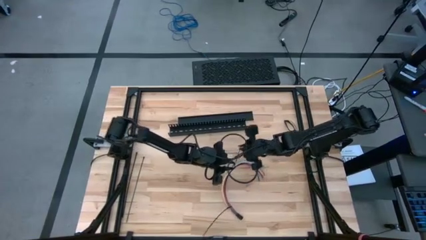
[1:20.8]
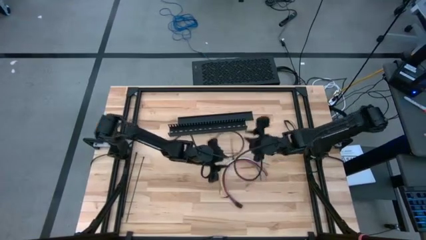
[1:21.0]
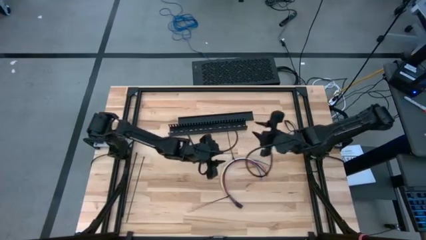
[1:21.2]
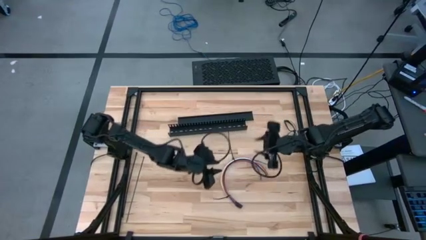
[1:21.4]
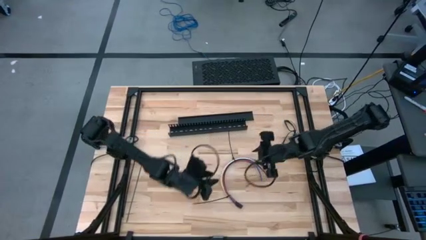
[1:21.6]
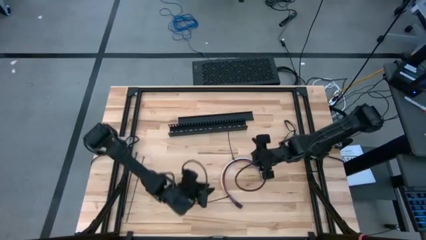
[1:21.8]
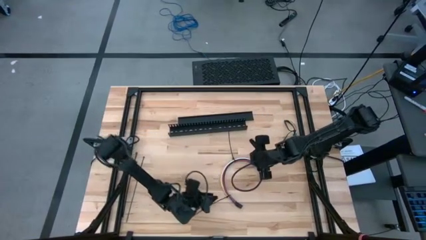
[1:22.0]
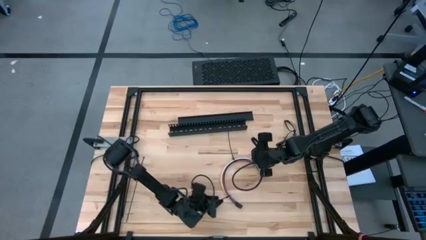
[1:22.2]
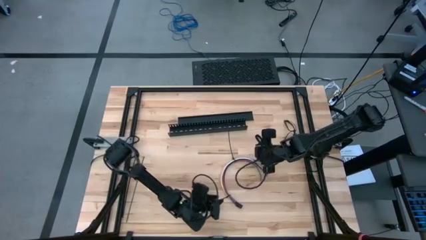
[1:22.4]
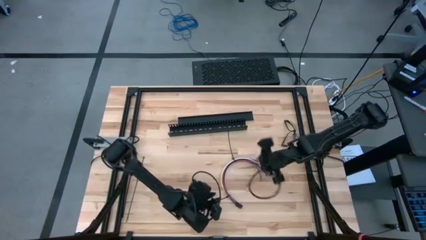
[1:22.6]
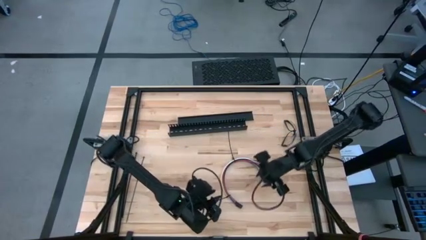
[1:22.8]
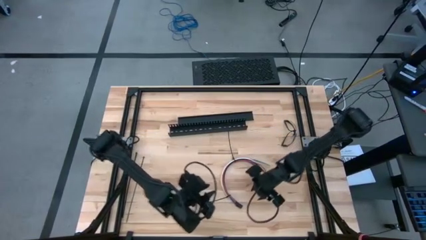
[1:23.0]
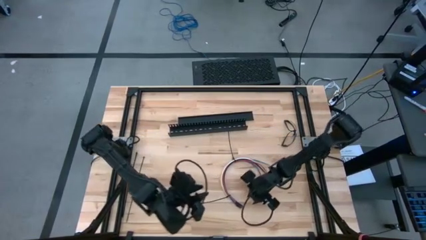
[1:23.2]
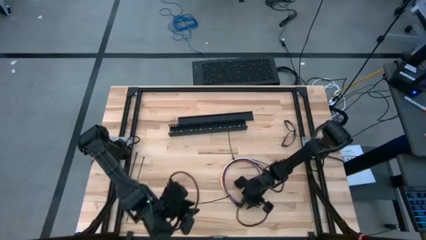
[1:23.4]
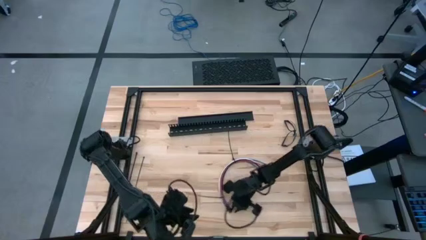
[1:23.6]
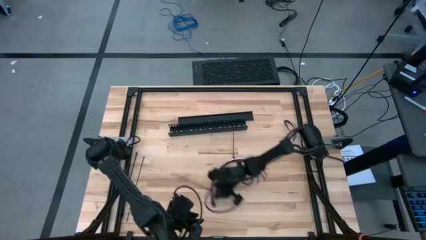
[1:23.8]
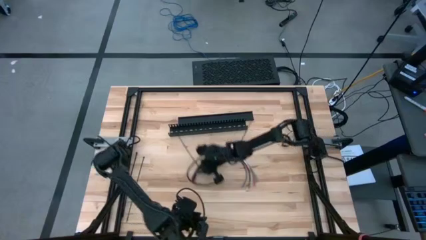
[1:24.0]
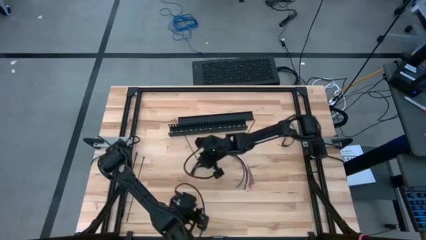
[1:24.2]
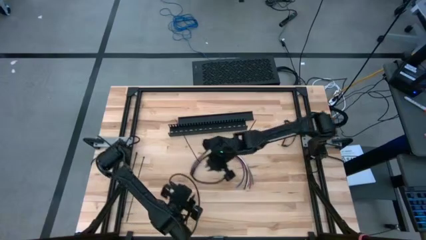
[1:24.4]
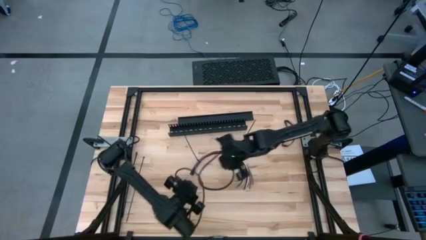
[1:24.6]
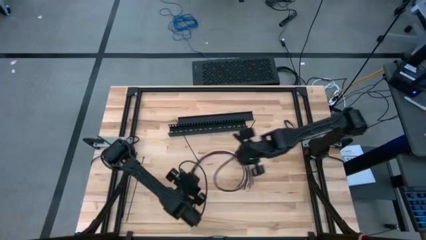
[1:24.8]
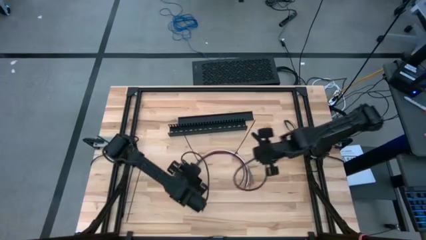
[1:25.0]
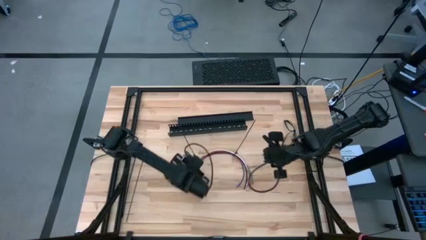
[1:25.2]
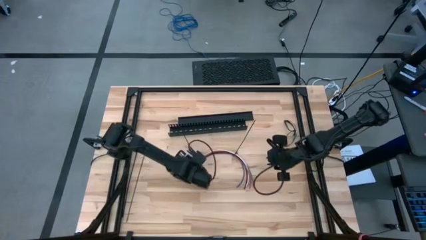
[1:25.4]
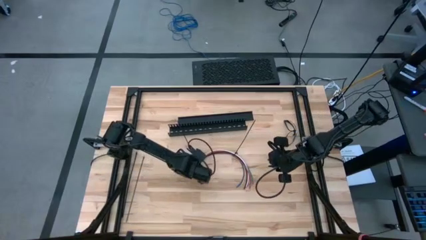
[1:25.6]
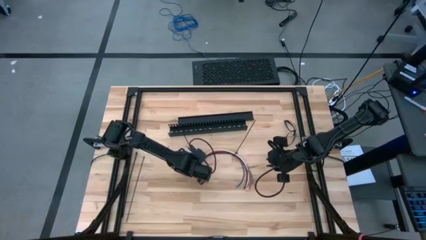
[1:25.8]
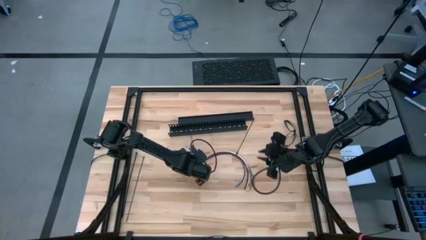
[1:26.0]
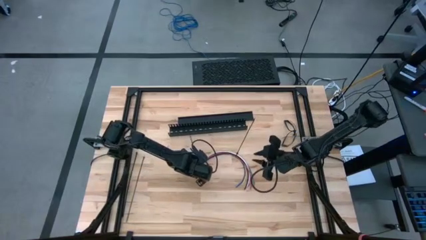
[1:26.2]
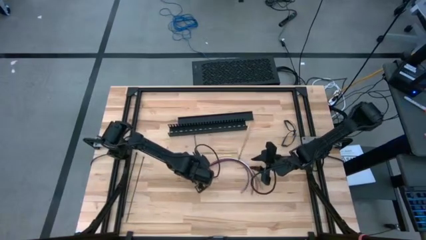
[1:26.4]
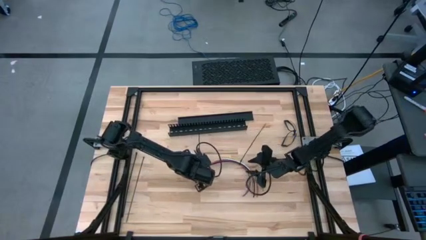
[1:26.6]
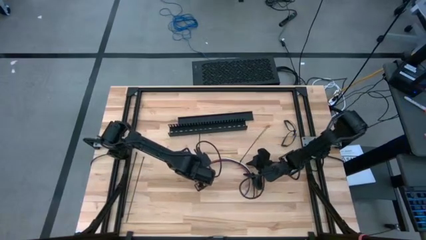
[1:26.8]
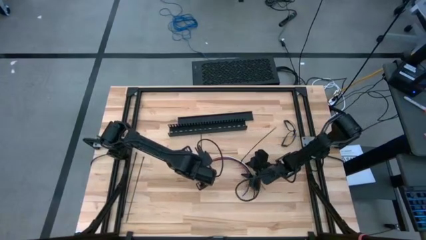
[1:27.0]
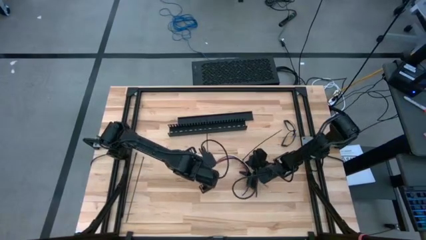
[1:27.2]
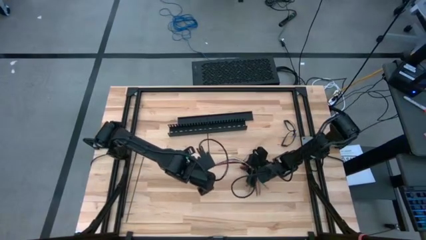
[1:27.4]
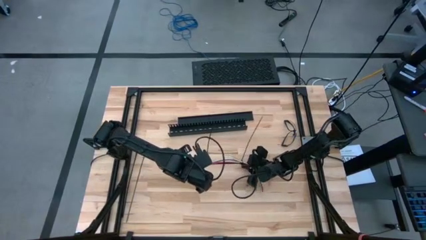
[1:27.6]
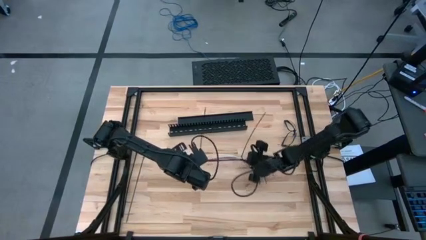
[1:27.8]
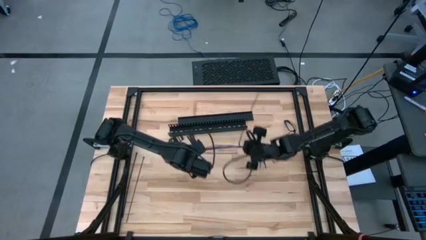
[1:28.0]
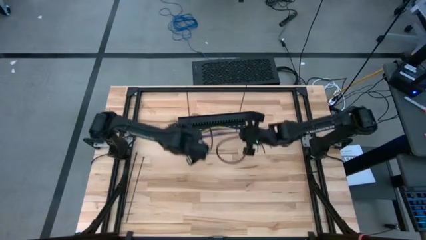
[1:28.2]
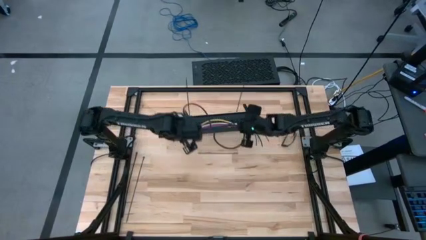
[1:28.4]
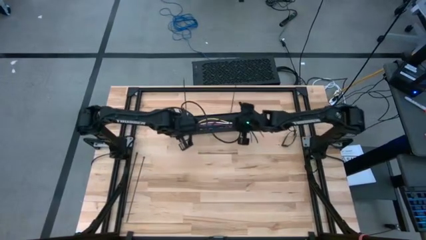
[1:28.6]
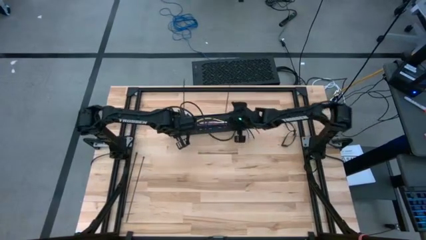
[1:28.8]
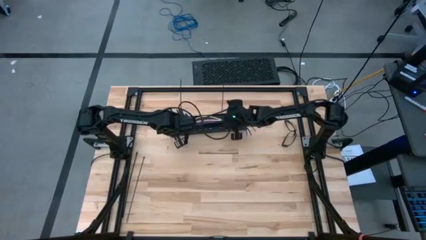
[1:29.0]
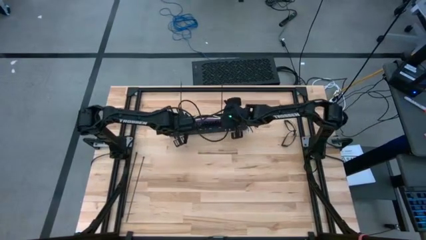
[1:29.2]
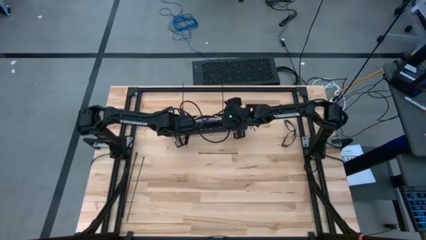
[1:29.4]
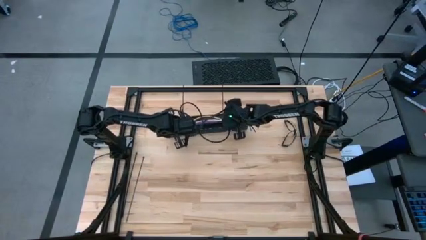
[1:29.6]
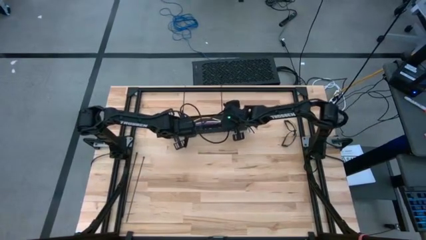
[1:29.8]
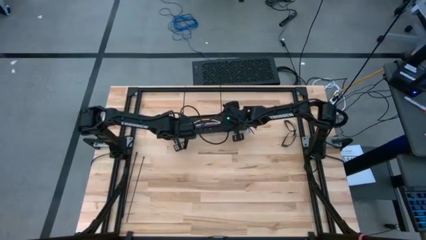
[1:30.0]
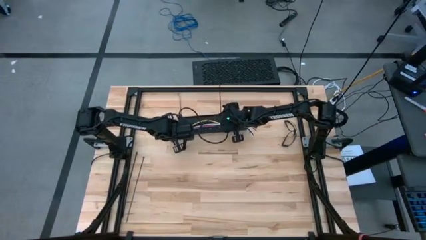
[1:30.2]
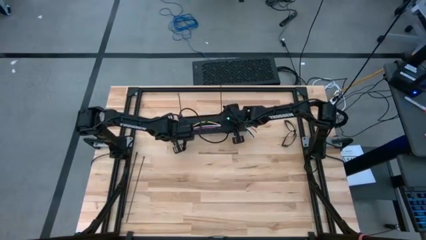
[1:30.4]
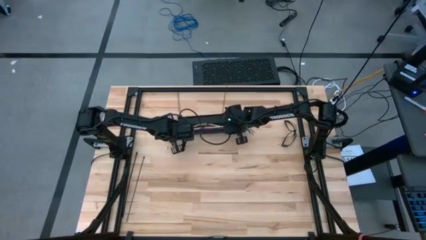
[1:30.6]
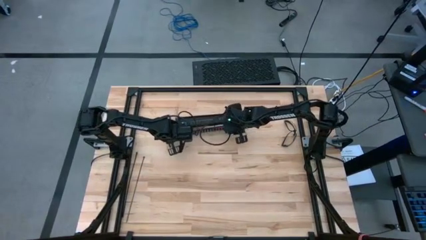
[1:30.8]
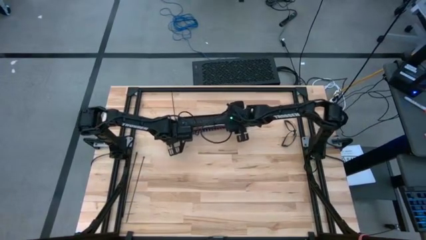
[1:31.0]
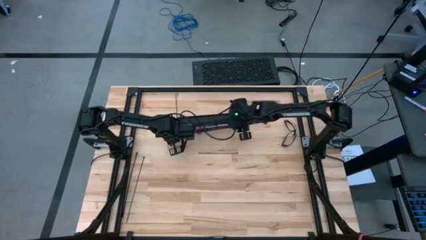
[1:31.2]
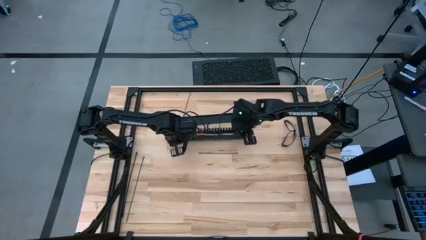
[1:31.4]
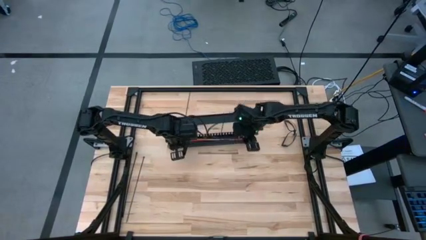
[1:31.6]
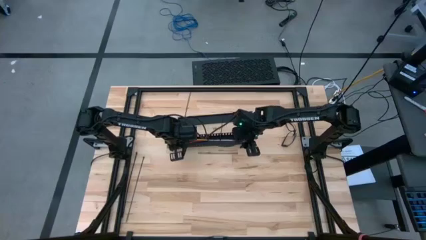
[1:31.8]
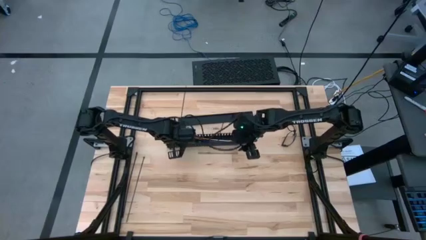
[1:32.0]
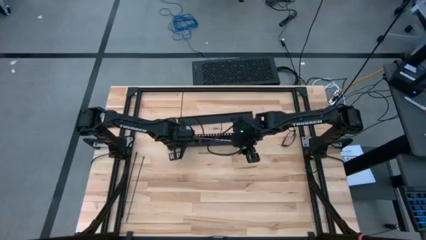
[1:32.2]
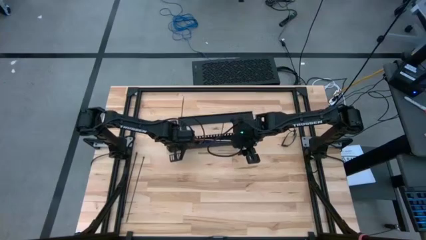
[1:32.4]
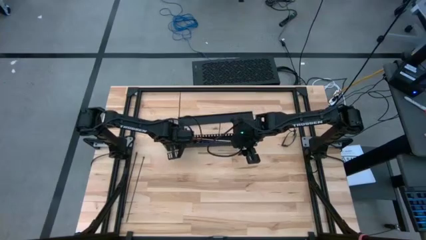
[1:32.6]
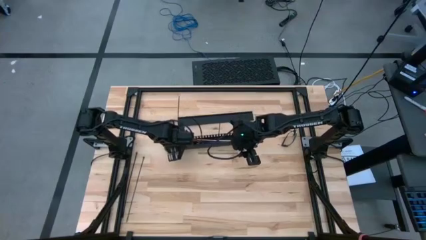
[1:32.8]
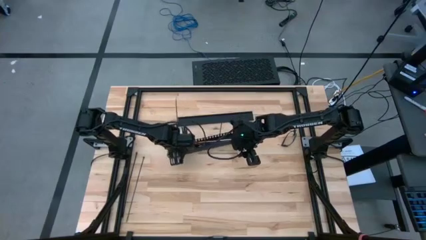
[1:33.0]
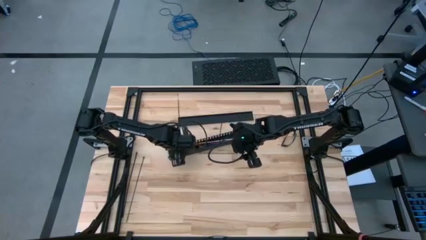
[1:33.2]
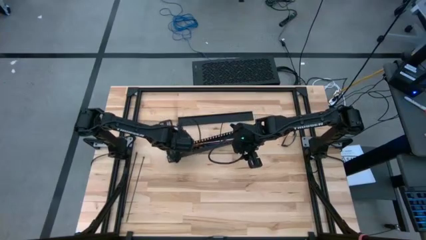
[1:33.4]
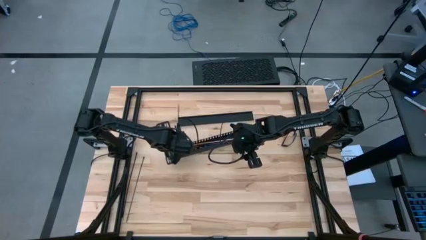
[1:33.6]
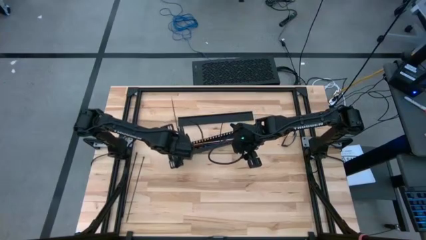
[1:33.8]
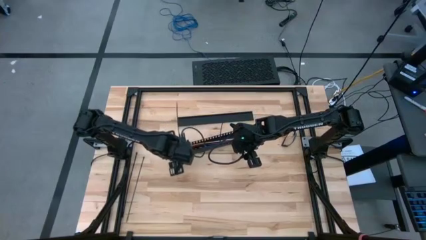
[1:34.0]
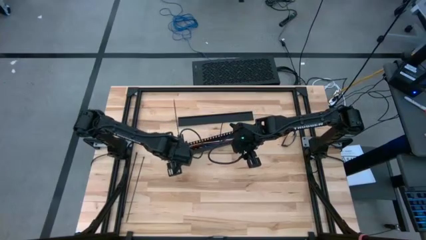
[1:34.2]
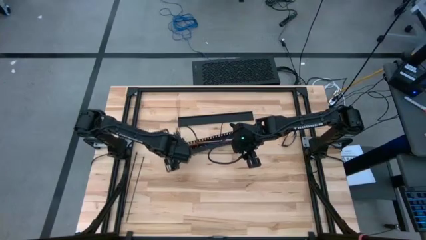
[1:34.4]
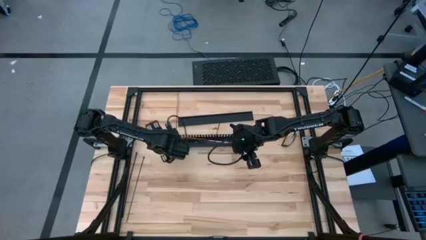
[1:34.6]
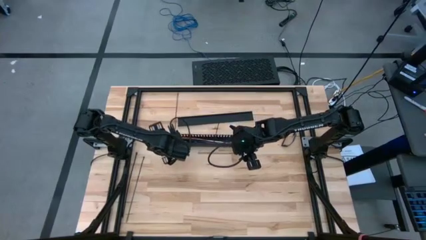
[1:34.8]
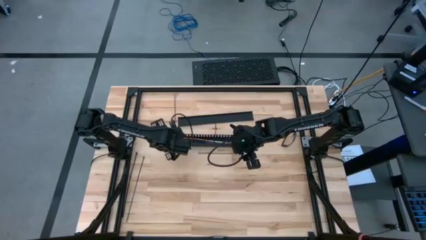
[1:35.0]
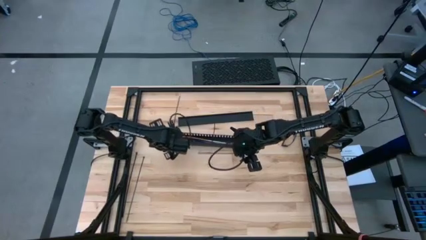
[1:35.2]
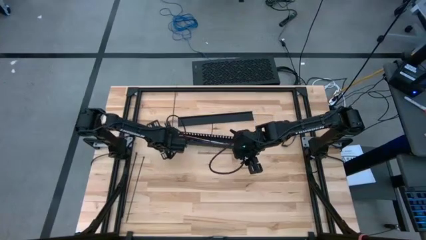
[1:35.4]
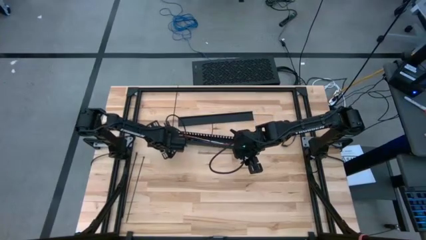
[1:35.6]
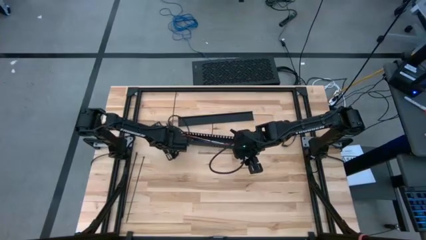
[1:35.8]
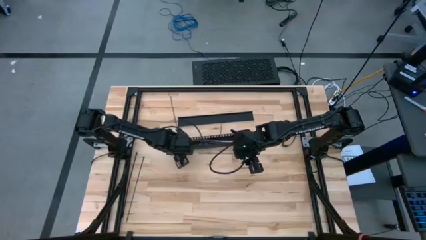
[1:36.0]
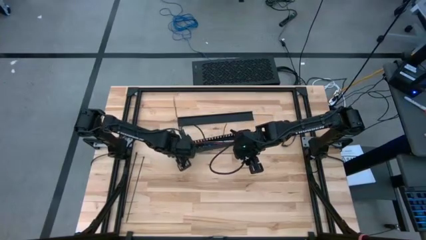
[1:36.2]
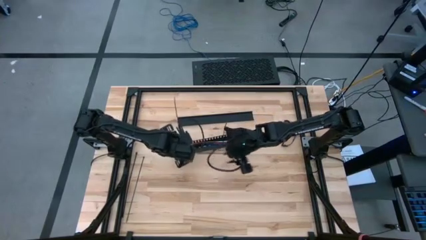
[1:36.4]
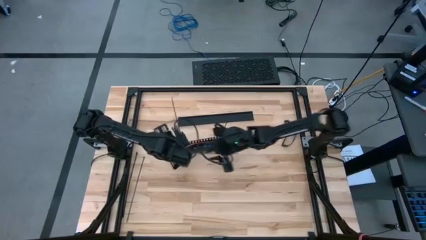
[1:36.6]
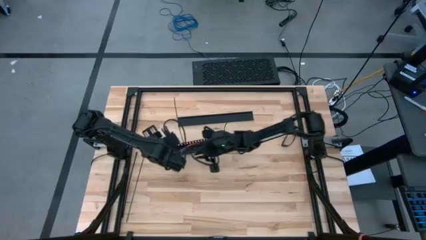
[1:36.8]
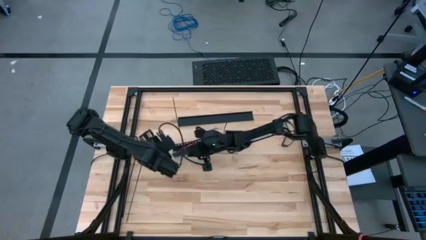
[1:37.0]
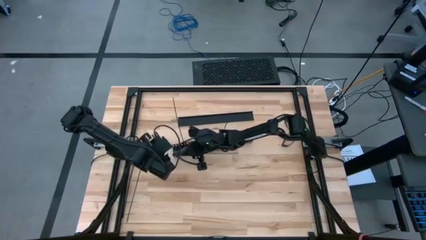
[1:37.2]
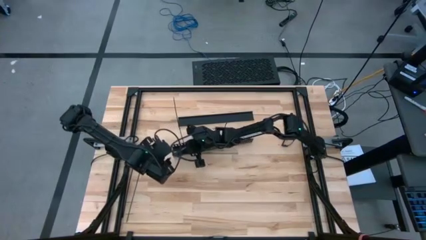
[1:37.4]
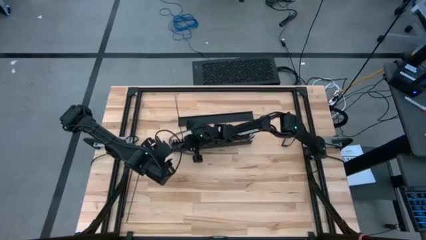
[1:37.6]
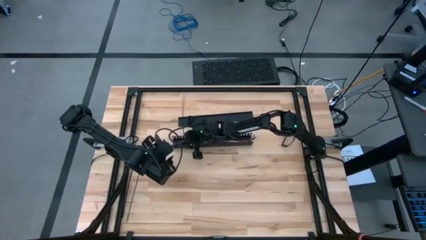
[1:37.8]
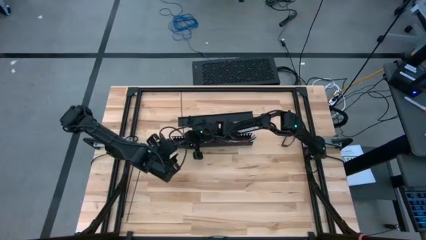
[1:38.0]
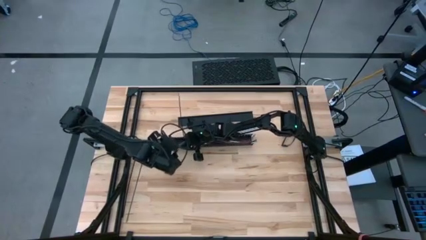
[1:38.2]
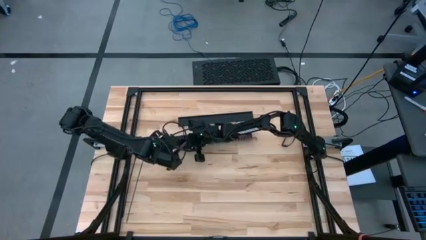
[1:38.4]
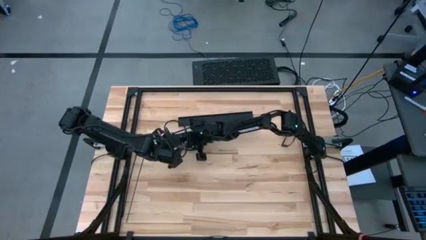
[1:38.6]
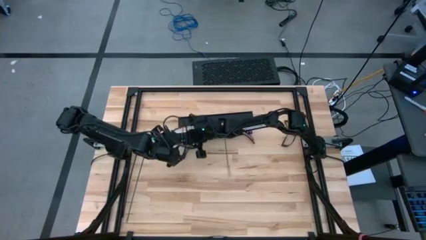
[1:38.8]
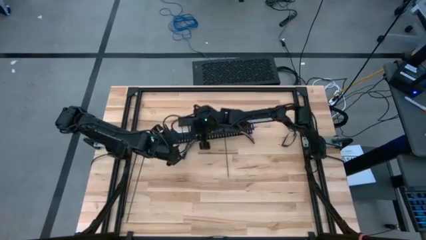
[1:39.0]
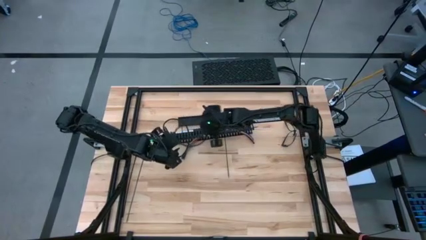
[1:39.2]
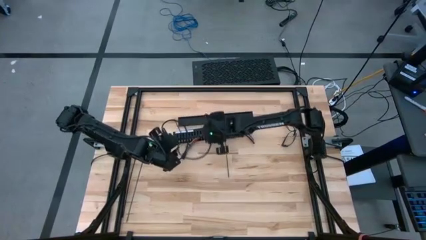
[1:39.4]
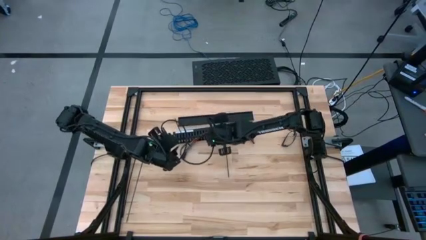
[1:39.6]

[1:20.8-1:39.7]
Task: Ziptie cables
Put the ziptied cables into the black cable duct
